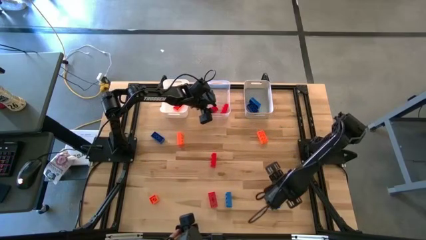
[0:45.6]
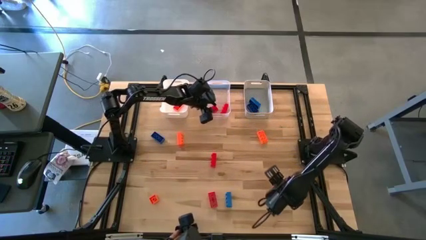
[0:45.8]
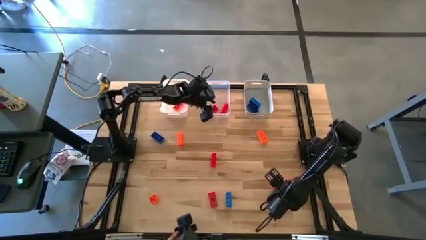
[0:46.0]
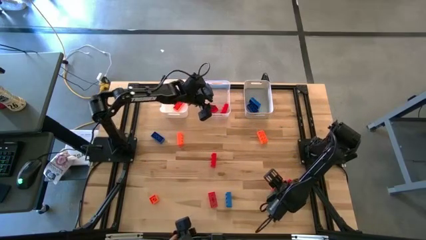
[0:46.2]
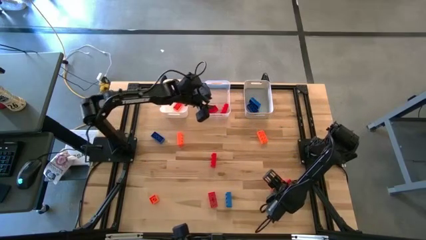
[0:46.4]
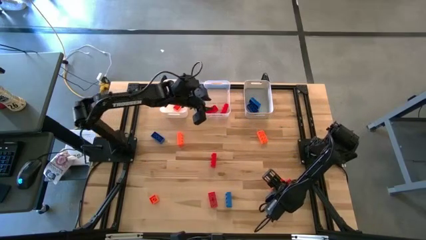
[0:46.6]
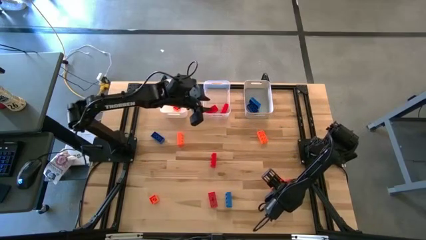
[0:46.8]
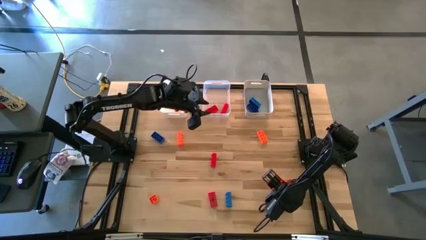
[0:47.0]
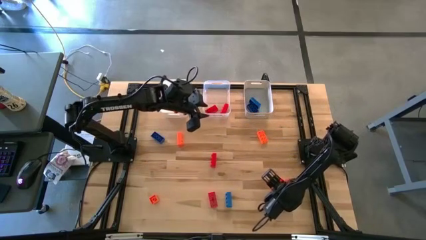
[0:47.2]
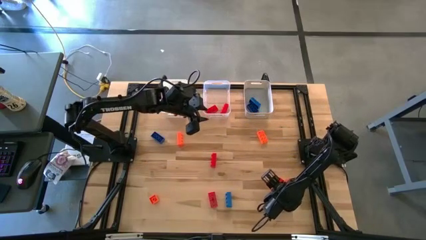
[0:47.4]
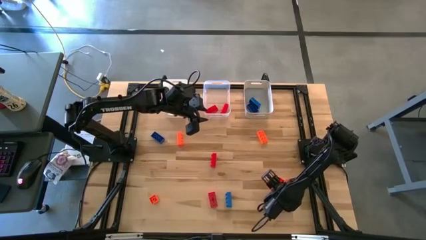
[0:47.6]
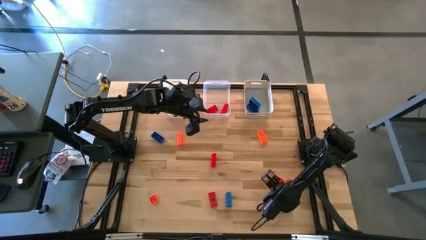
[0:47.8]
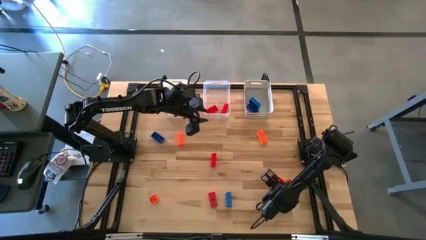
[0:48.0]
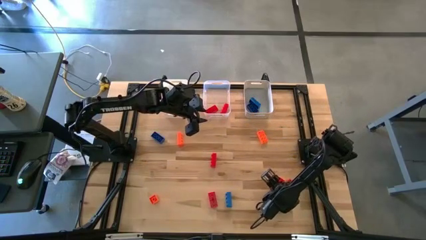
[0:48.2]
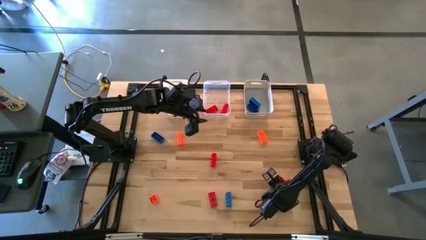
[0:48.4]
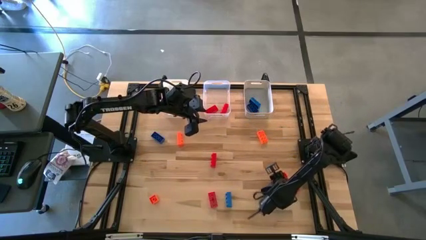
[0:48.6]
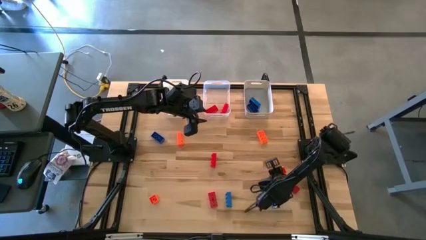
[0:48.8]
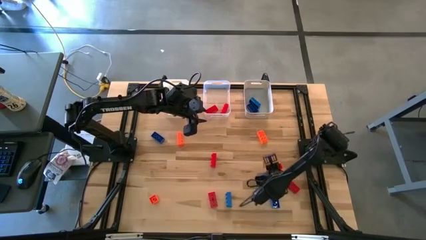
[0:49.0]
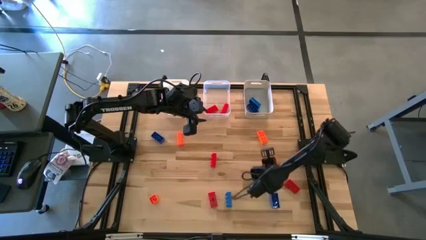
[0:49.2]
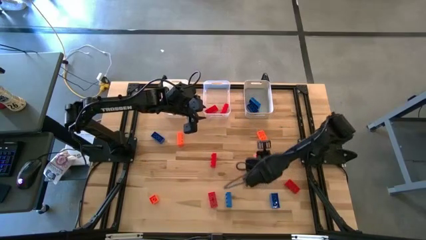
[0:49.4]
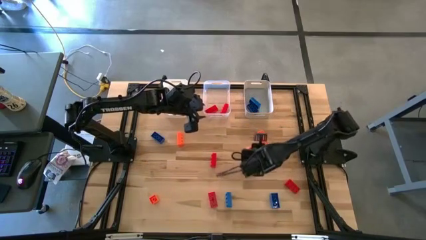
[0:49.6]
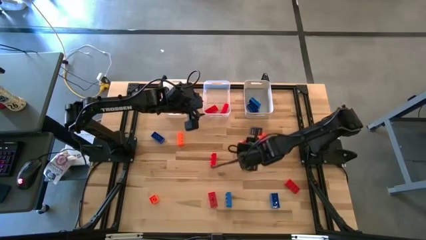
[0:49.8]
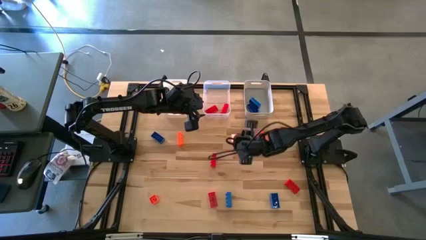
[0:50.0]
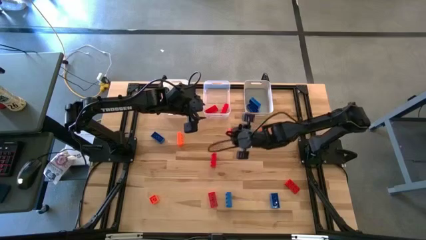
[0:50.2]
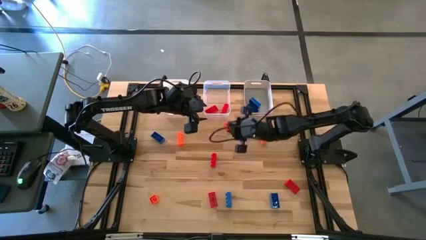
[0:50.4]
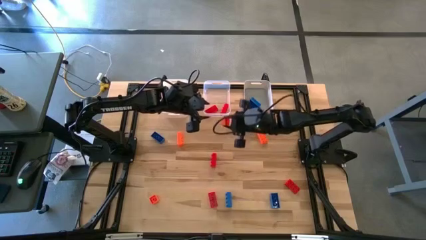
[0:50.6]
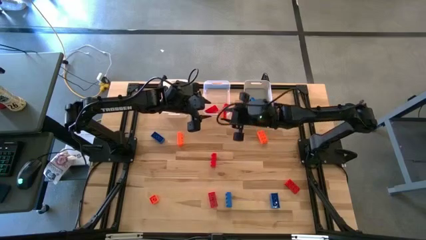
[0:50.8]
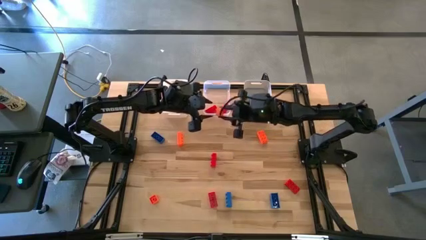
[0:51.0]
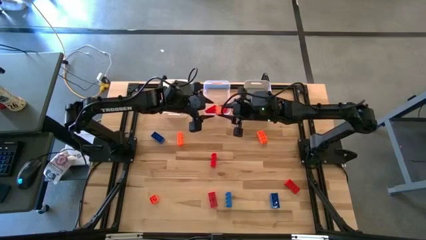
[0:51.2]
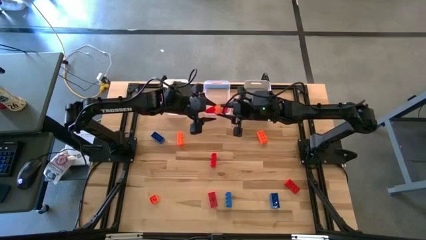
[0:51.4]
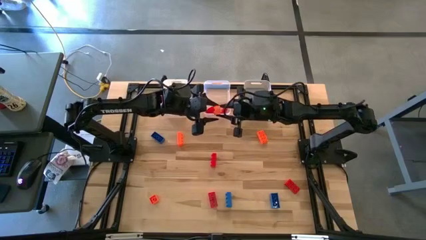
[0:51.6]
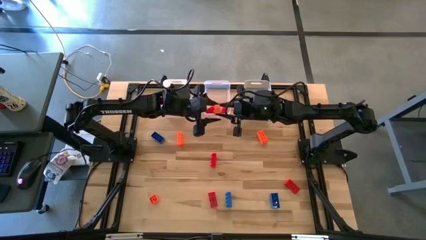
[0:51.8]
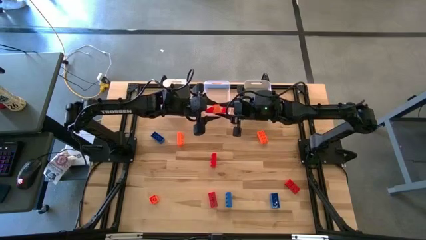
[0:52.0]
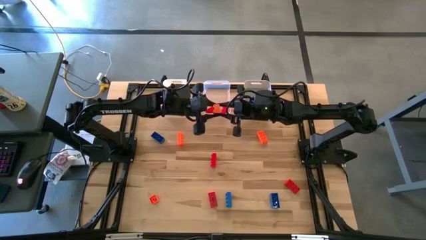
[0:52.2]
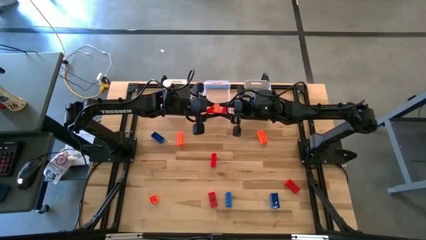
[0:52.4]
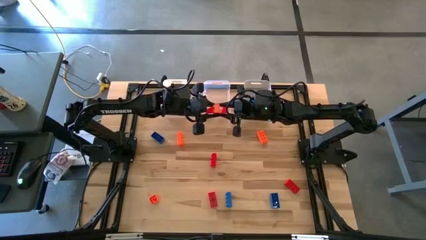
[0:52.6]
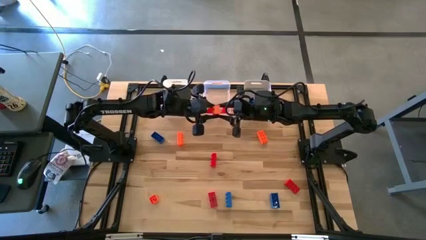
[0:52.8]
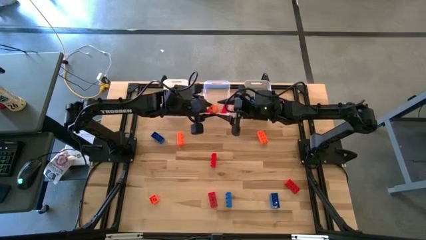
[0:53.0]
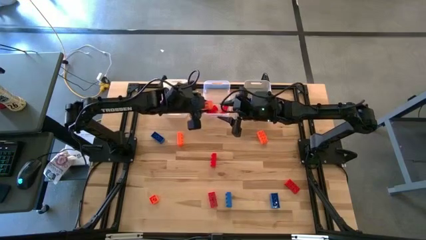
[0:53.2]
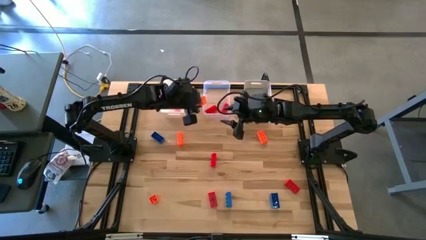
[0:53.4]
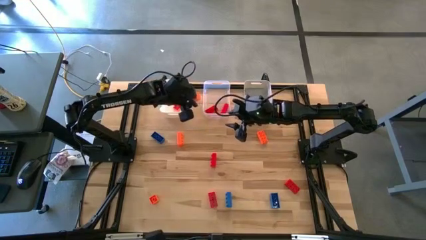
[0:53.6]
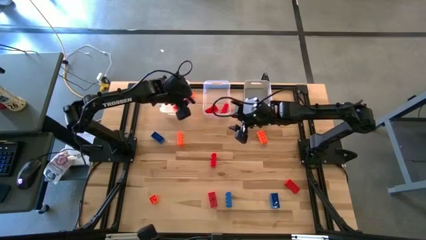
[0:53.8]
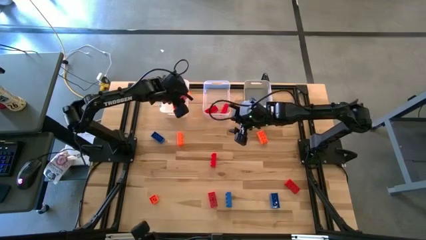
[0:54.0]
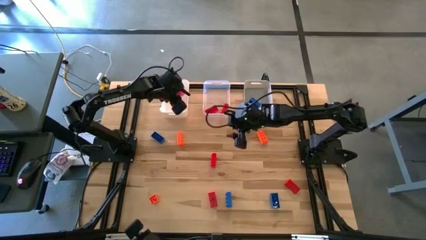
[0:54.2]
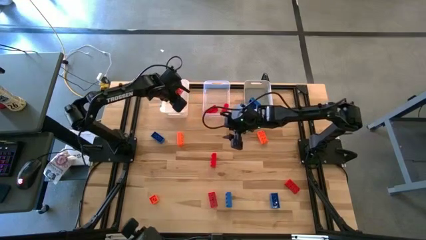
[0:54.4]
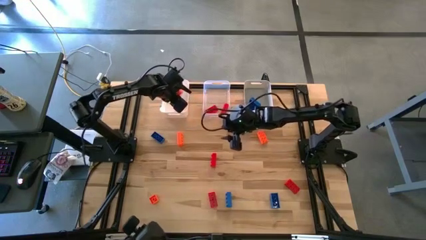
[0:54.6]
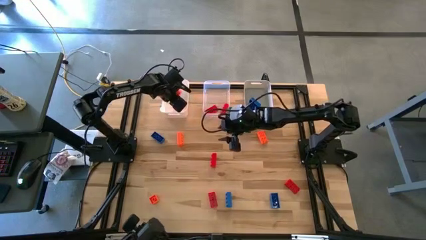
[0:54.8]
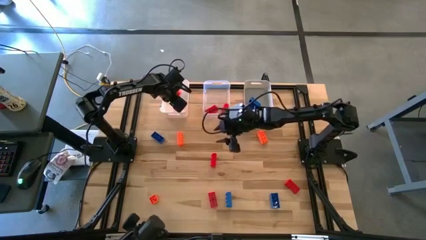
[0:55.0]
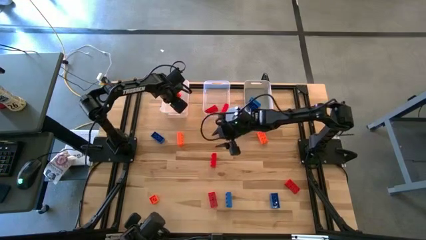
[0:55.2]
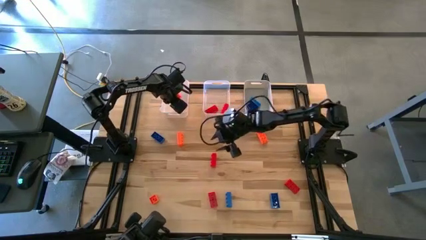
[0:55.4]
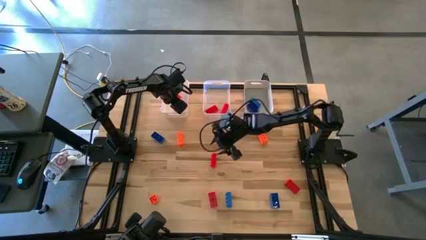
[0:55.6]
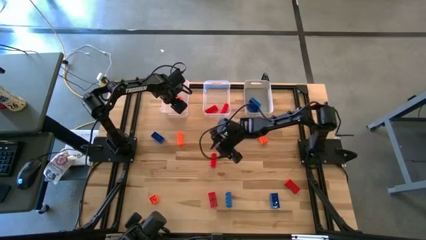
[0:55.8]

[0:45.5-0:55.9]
Task: Sort & place blocks by color
Put the orange game piece into the white bin

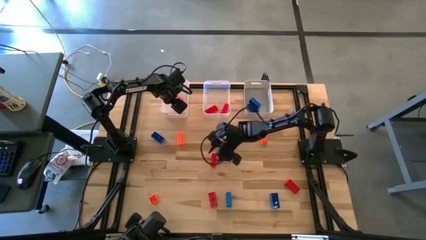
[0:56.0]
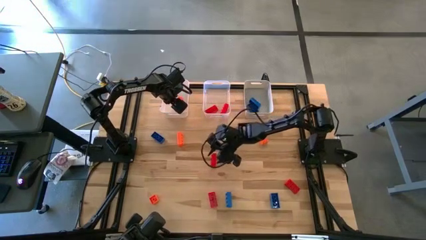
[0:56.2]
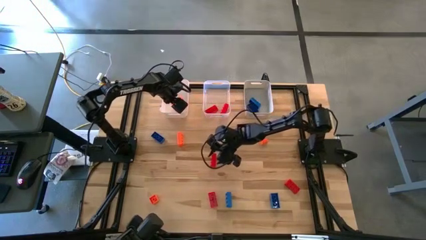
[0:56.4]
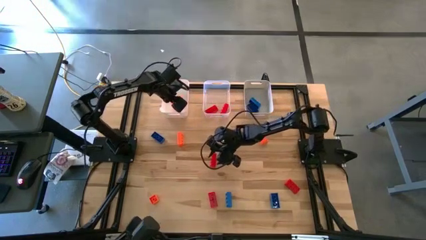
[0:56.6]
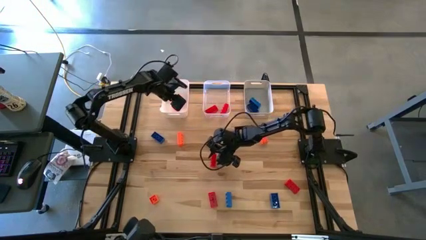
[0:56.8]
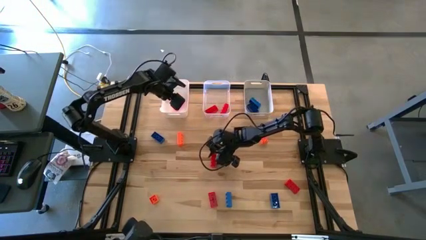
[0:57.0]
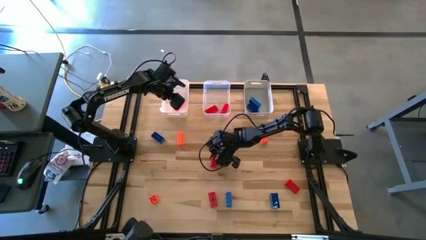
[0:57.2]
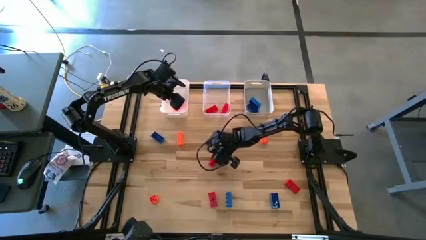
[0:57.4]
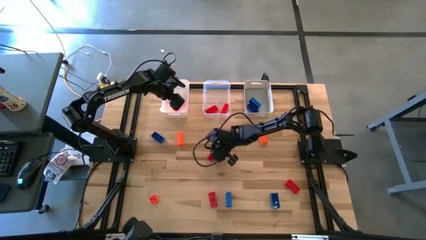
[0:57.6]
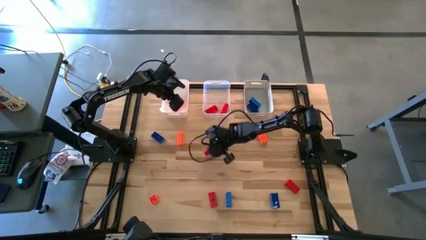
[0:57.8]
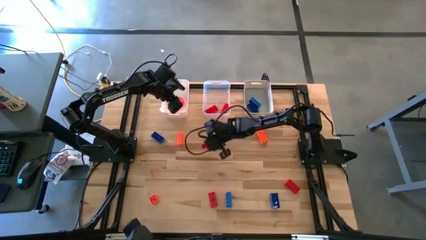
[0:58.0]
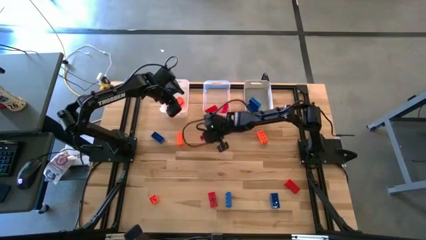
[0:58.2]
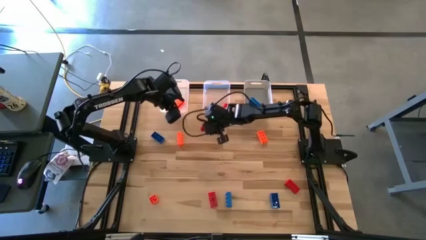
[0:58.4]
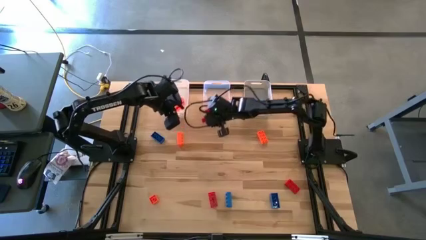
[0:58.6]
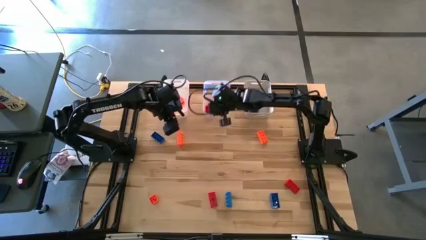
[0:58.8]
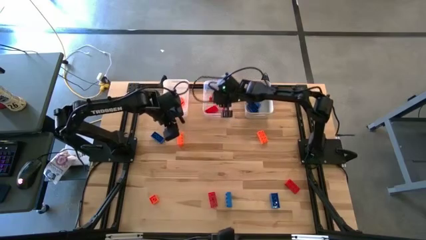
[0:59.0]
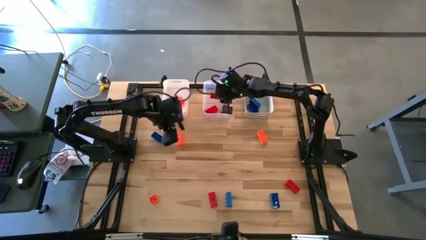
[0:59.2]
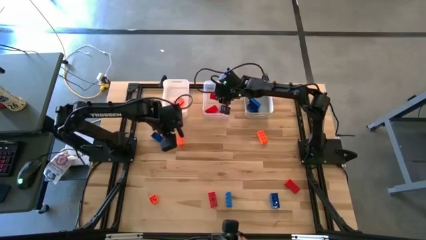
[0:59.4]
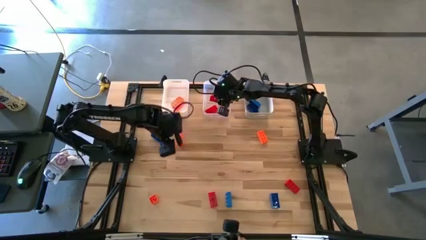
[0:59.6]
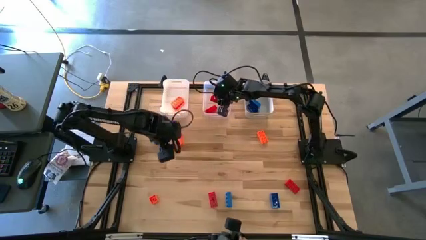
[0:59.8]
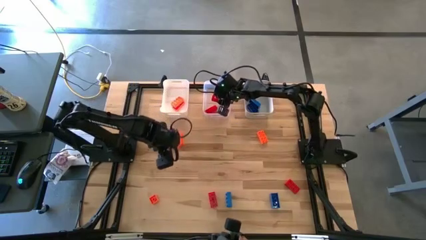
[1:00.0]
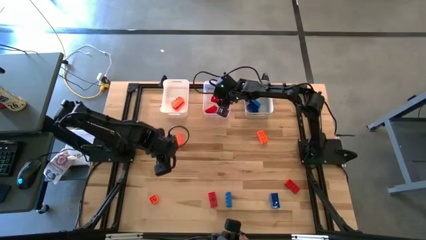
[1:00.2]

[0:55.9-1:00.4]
Put the red game piece into the transparent bin

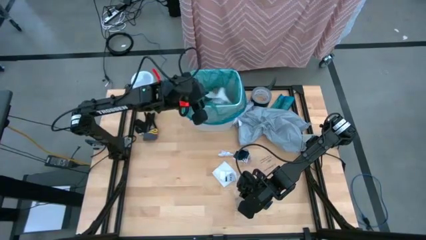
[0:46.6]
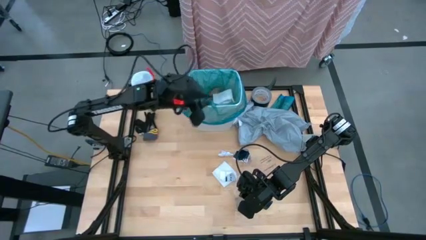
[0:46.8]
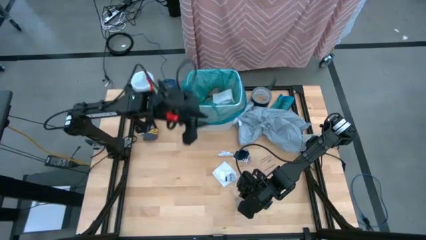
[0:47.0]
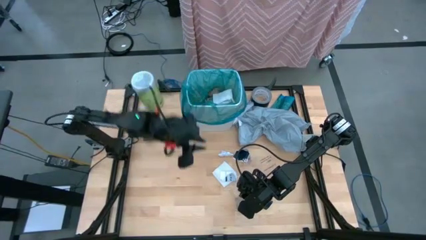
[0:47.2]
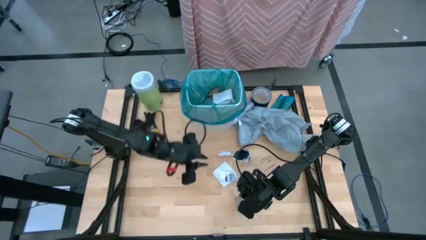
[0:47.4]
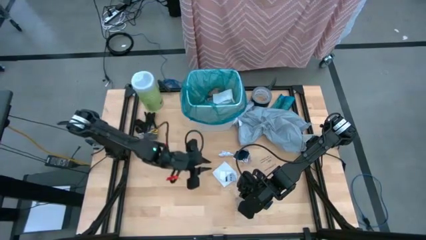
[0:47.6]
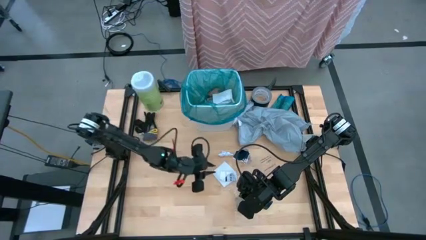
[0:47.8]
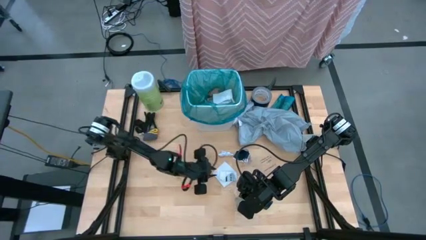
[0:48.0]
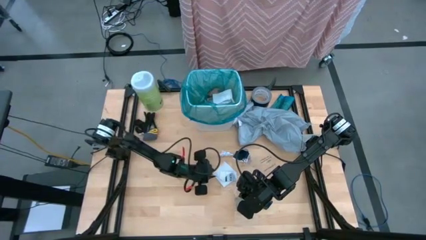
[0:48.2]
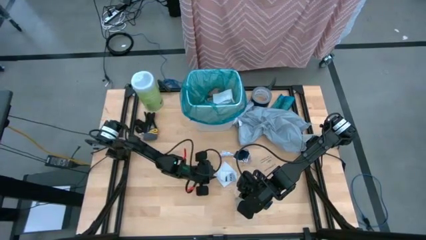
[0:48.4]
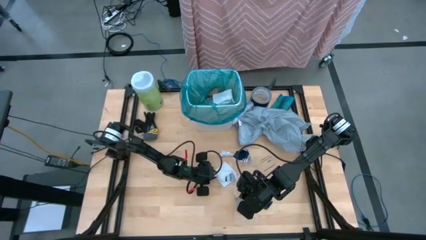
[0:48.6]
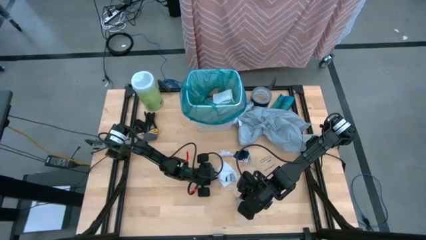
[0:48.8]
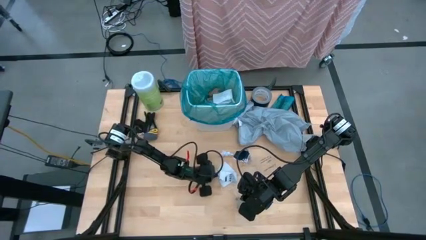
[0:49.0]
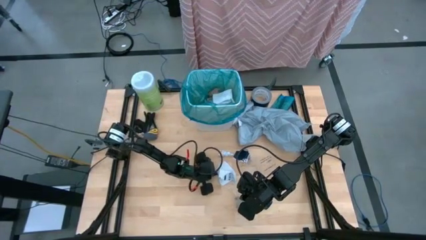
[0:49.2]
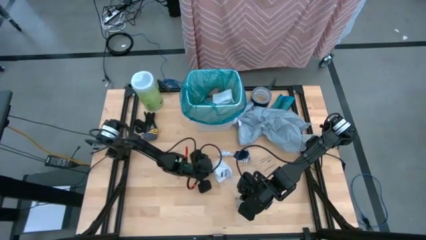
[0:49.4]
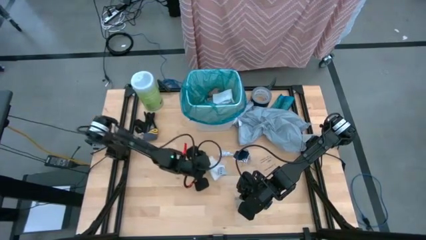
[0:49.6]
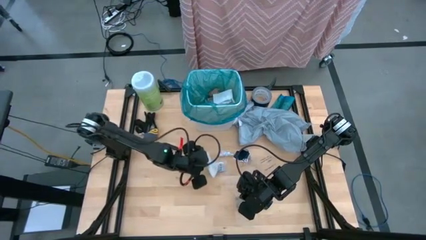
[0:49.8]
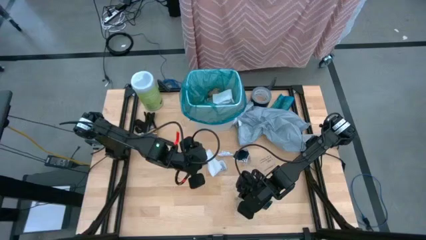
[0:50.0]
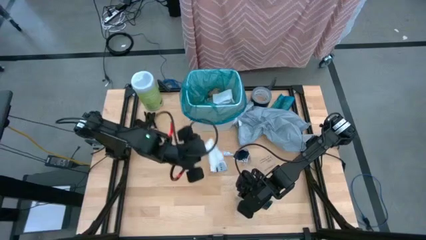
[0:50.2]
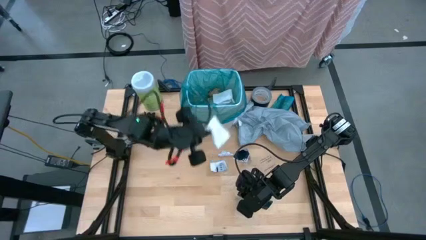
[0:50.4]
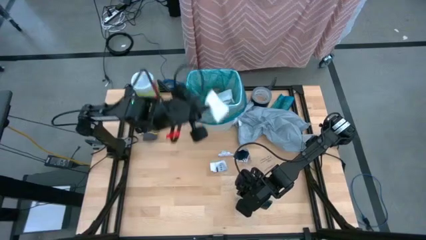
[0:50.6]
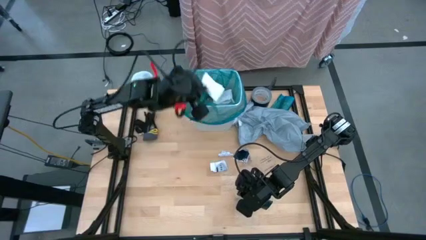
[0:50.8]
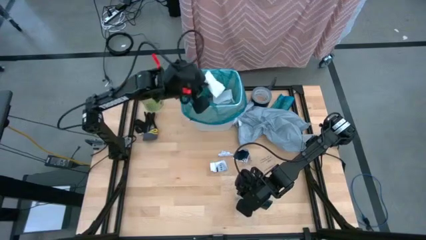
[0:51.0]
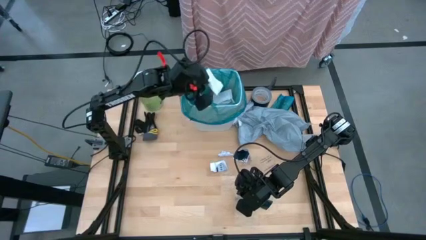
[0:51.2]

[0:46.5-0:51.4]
Task: place trash/remove bag and relplace
Put the white tissue into the trash bin
